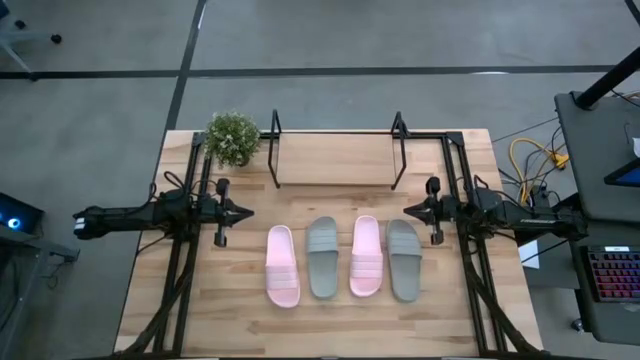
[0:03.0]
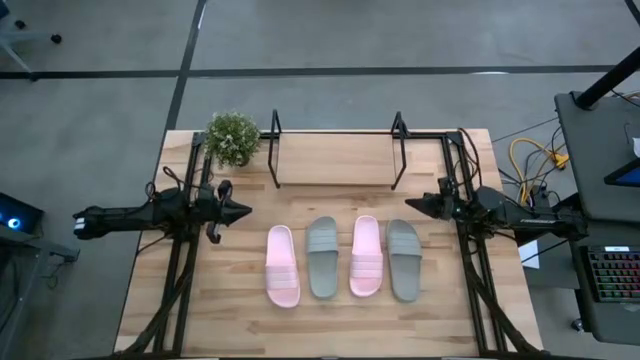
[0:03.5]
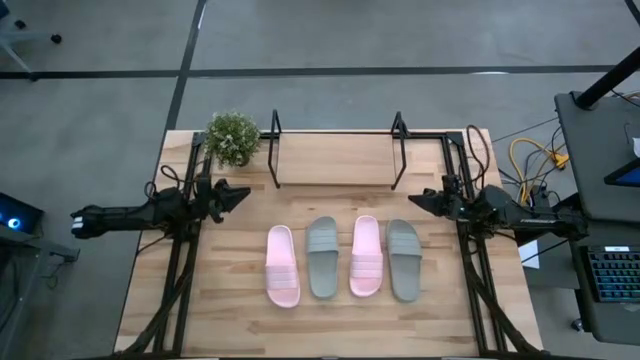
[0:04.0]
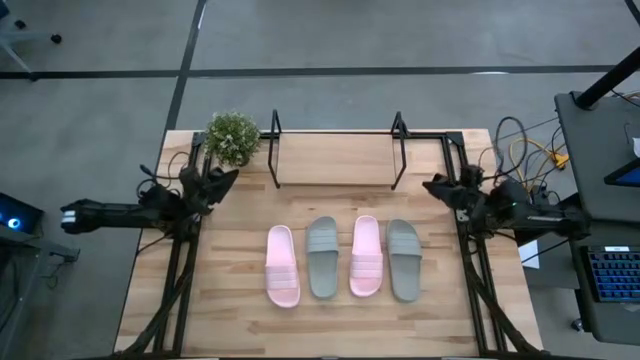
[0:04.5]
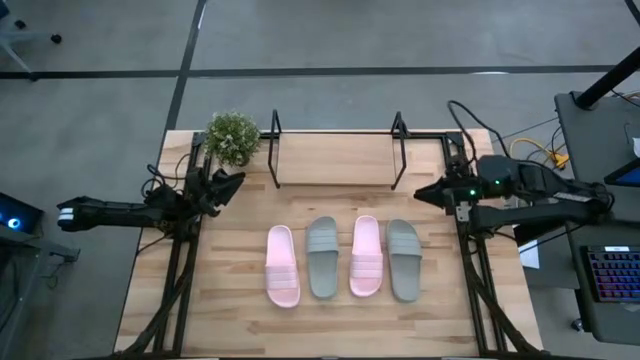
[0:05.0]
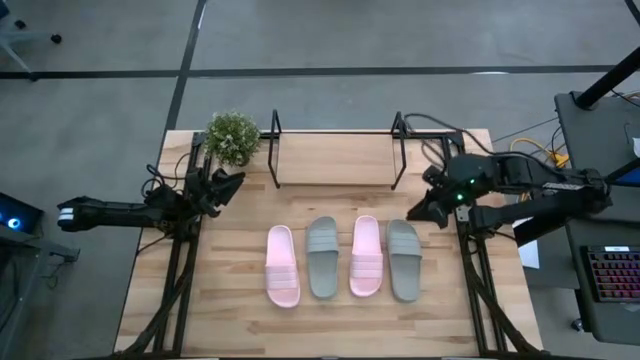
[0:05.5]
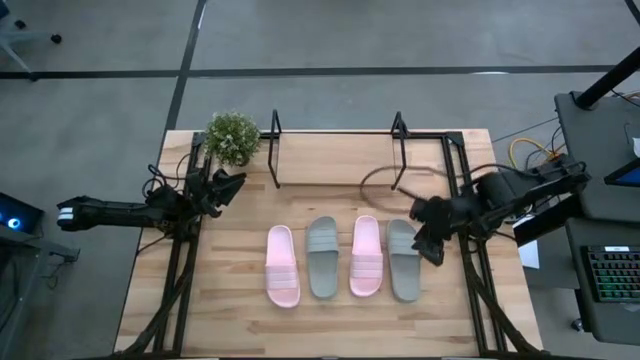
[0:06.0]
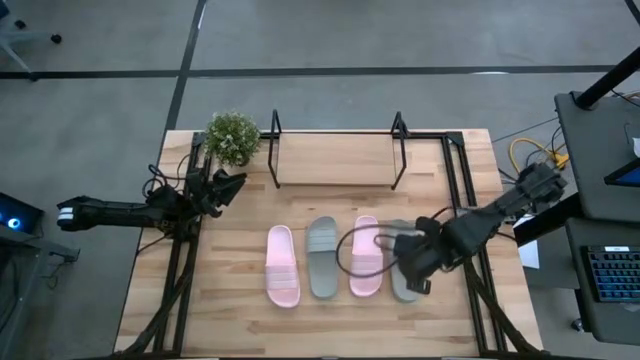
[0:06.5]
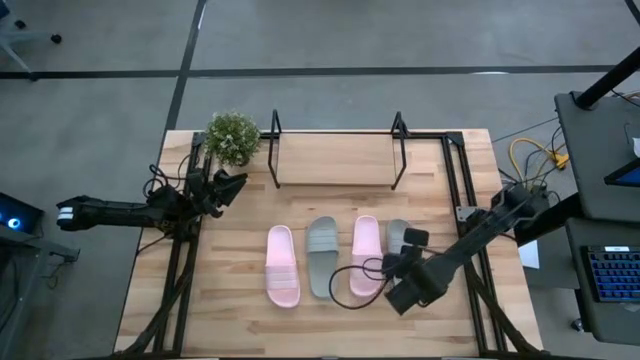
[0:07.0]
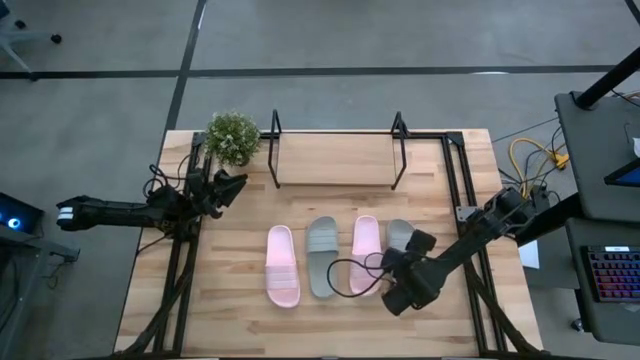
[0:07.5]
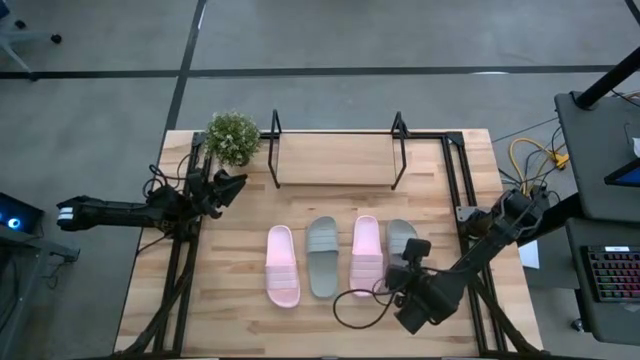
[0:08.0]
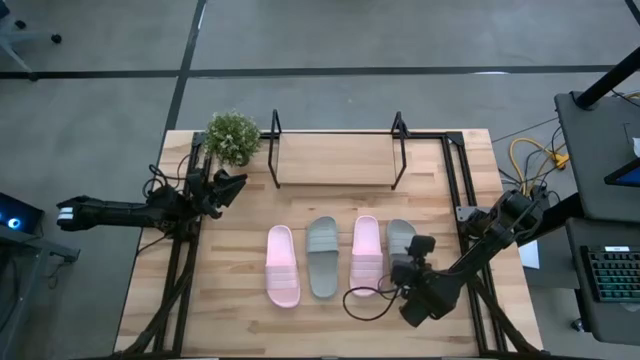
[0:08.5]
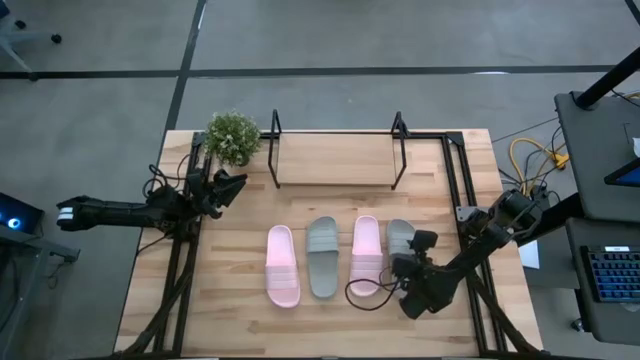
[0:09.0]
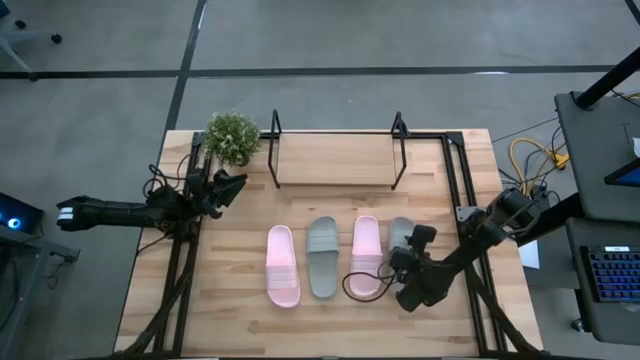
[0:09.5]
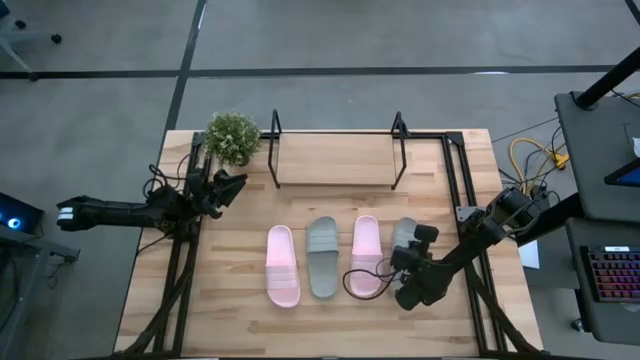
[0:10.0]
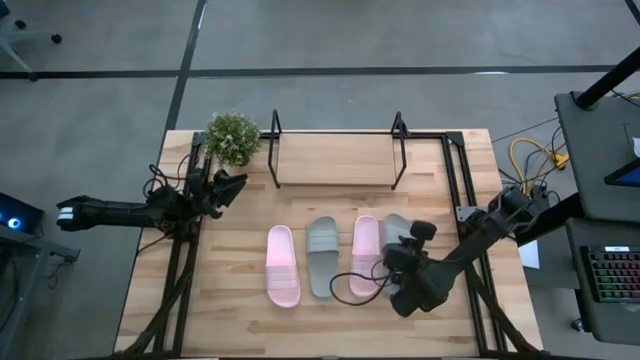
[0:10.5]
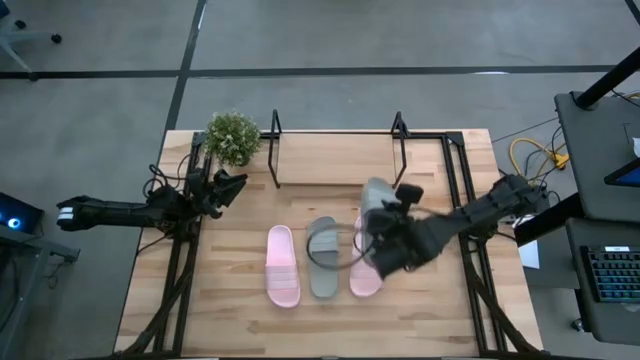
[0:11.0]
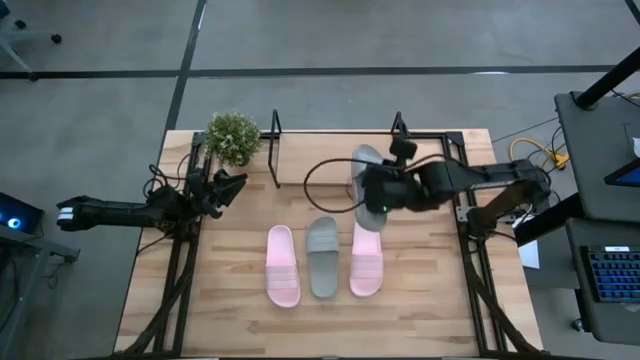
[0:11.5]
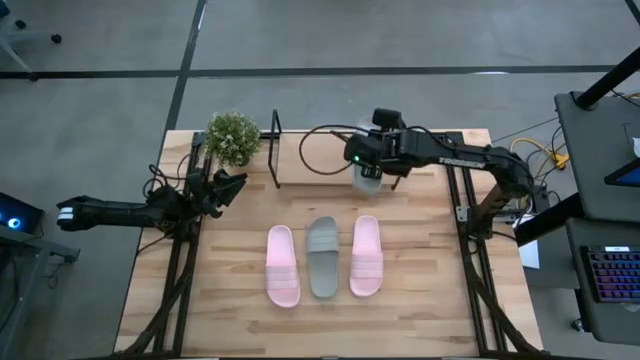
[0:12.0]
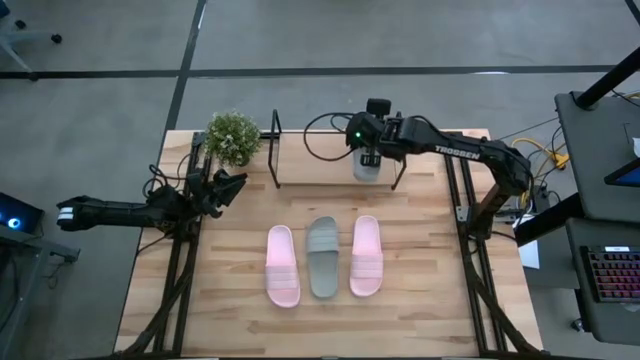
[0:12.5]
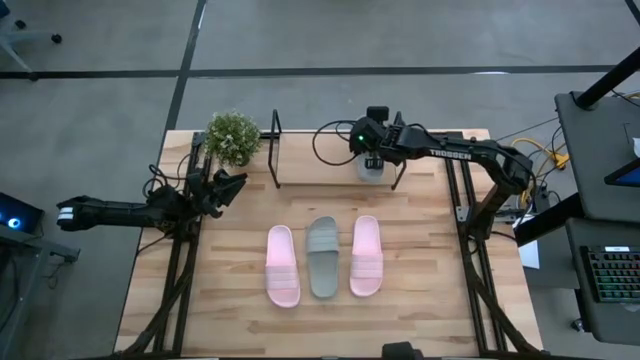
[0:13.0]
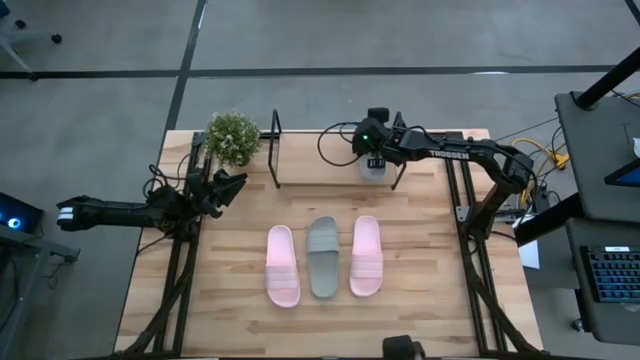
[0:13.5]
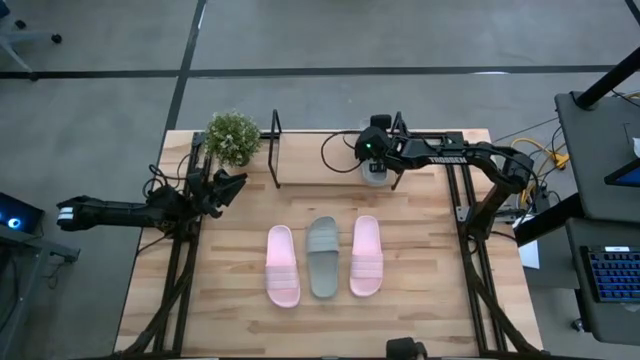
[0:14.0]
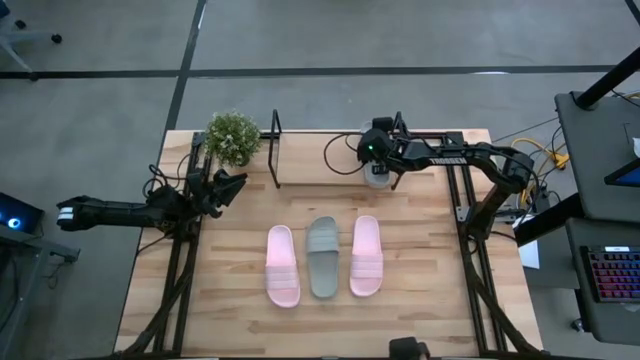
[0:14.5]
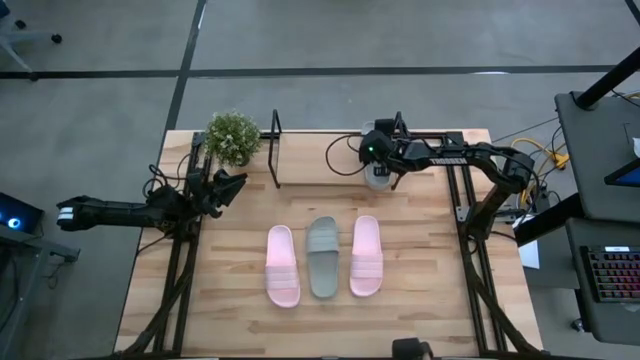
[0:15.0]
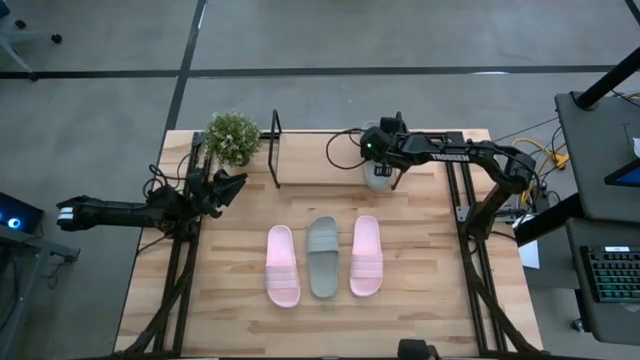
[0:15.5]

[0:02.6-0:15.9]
Task: Pick and place slides into the shelf
Put the right gray slipper on the shelf

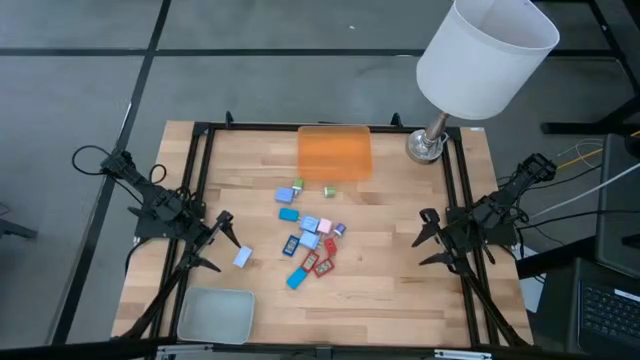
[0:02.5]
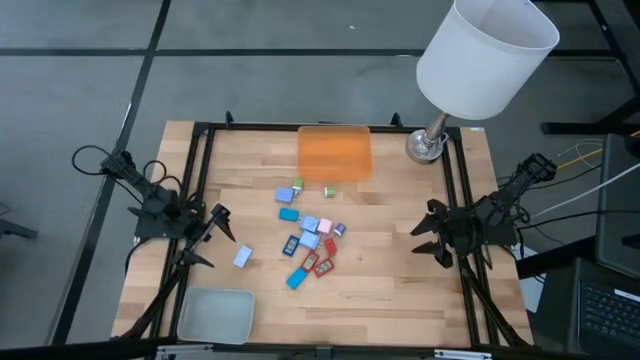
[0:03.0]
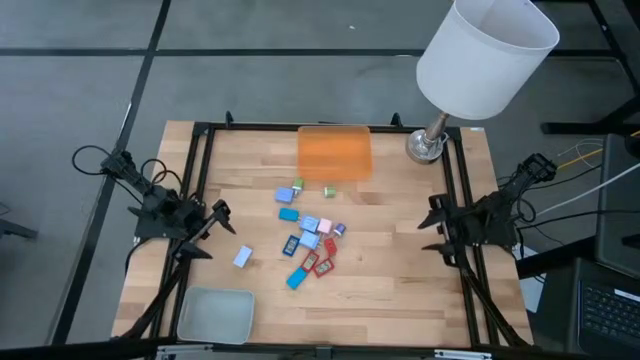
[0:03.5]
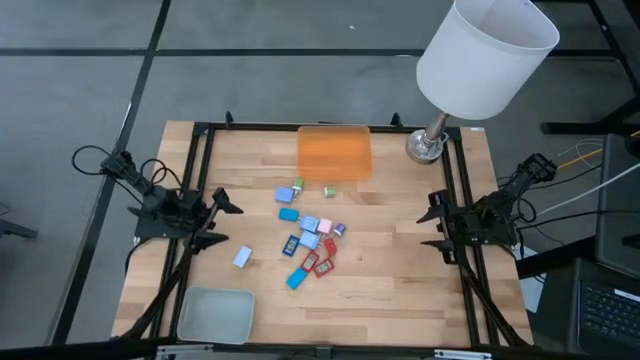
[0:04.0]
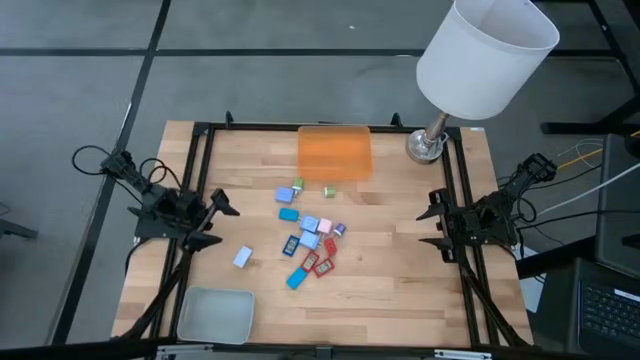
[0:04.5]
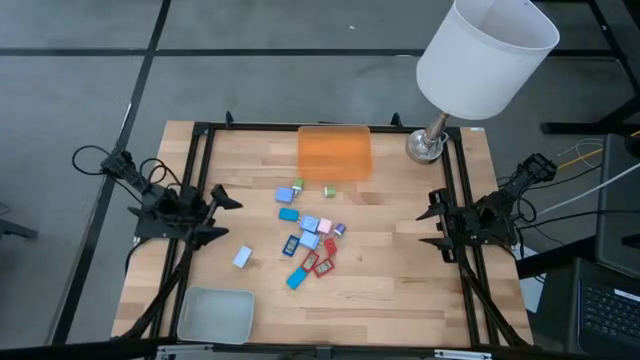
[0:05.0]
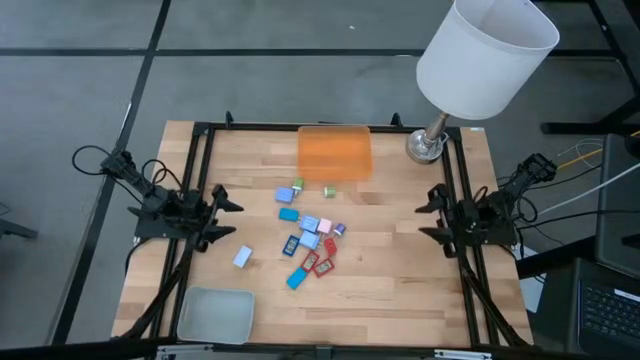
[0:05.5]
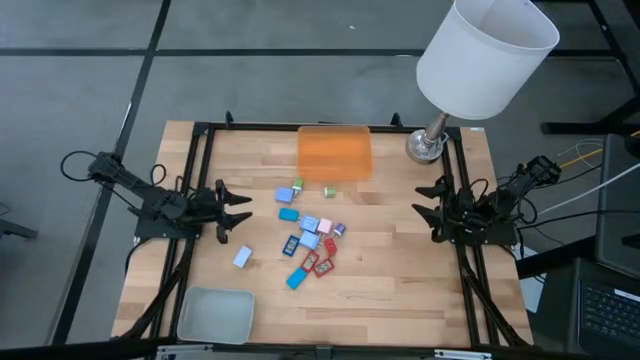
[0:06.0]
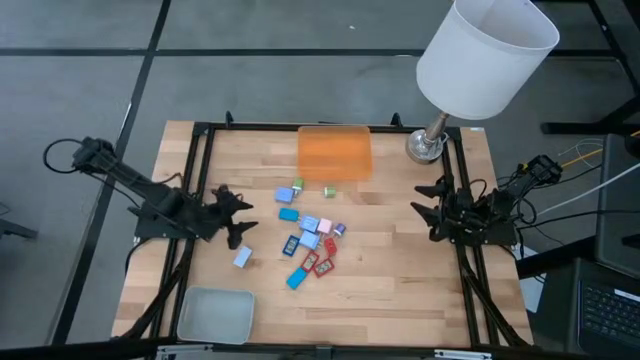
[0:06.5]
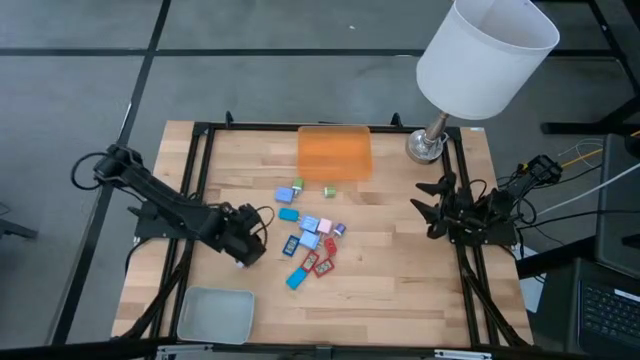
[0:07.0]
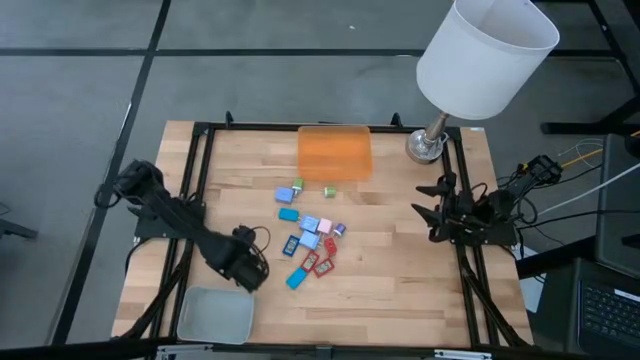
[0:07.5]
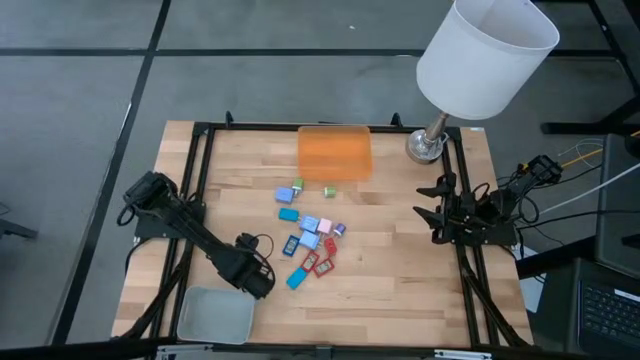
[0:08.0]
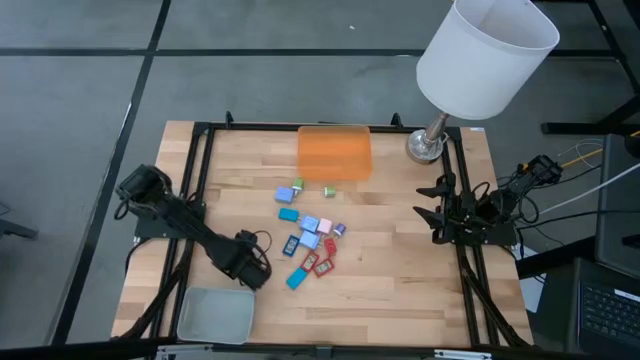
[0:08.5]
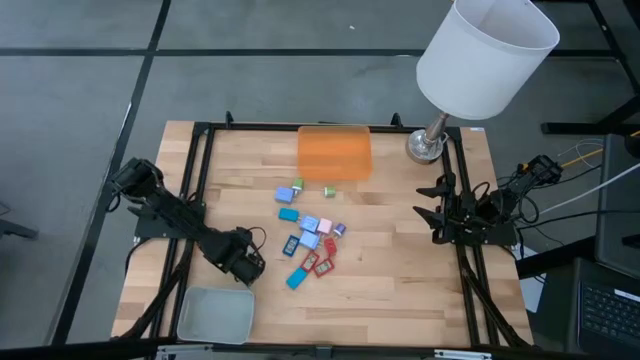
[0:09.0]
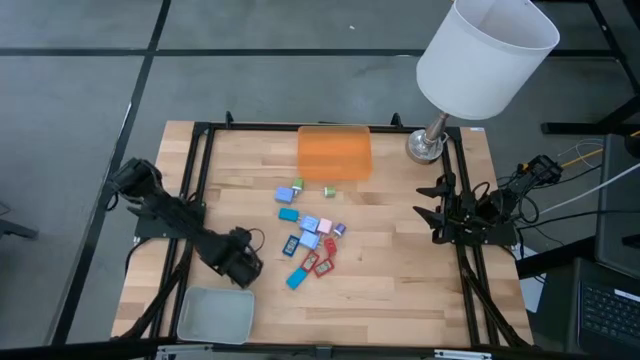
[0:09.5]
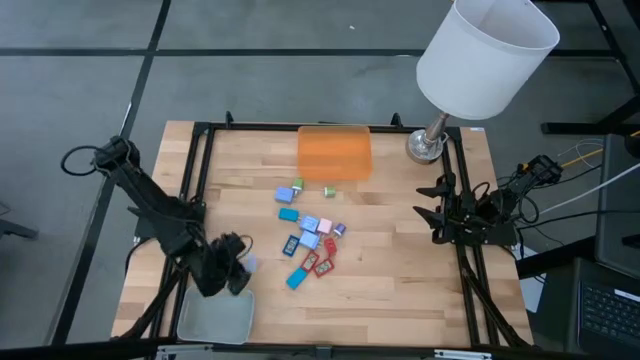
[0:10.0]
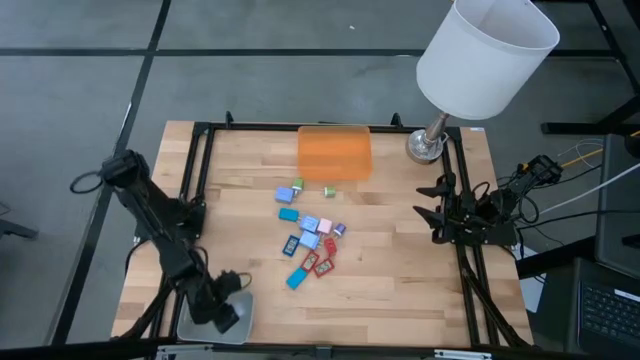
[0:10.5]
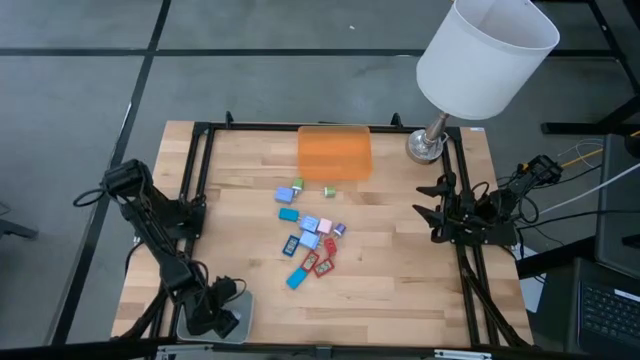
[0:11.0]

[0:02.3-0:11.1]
Task: Pick & Place Office items
Put the white digital timer into the gray bin
